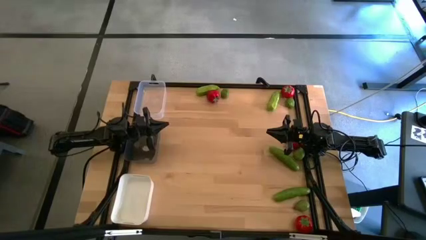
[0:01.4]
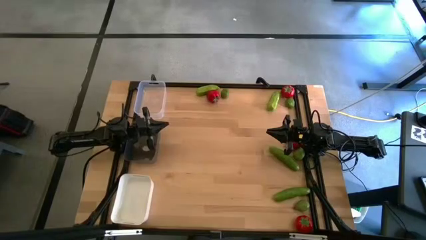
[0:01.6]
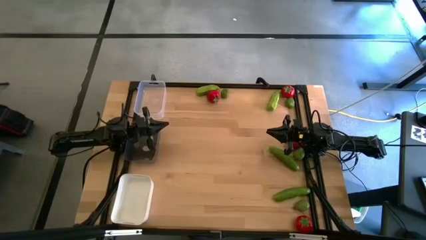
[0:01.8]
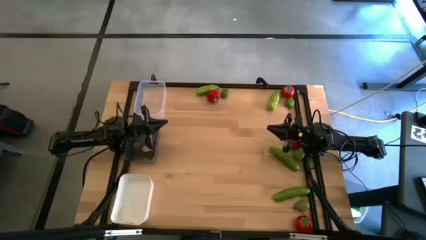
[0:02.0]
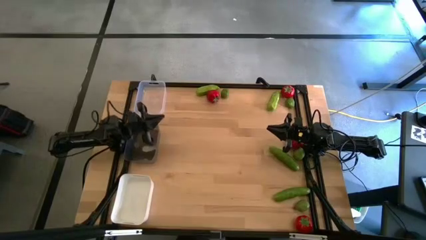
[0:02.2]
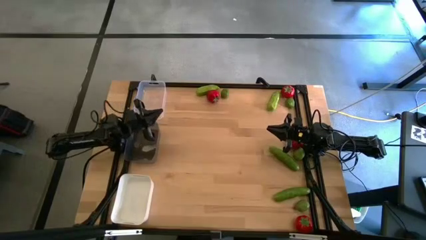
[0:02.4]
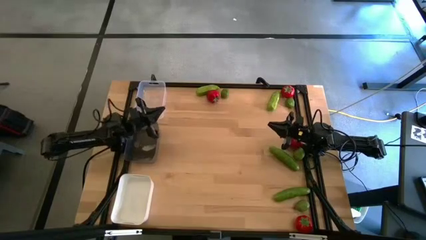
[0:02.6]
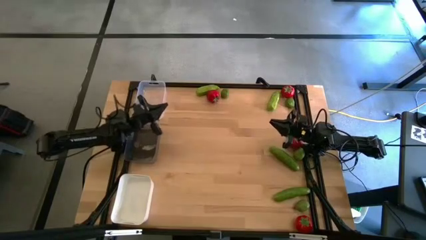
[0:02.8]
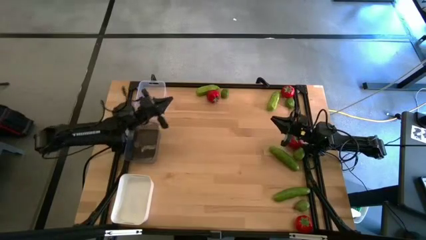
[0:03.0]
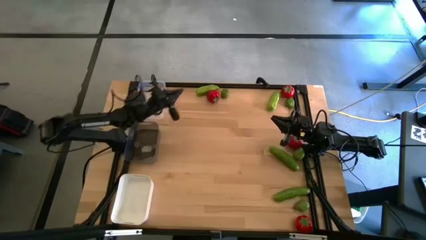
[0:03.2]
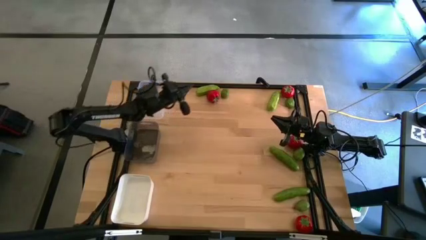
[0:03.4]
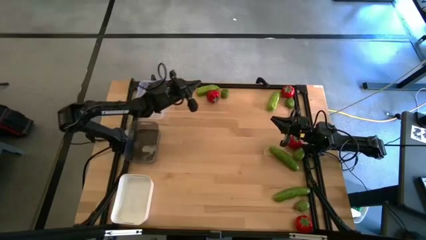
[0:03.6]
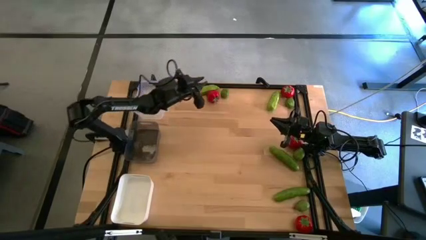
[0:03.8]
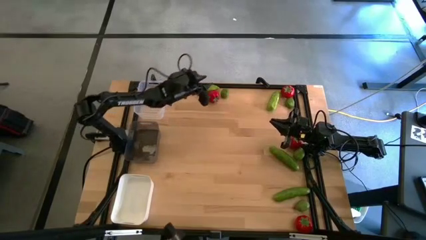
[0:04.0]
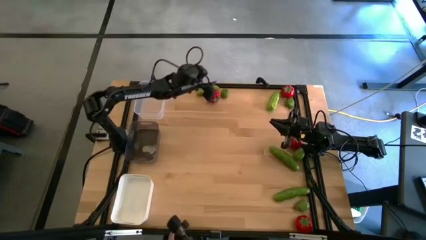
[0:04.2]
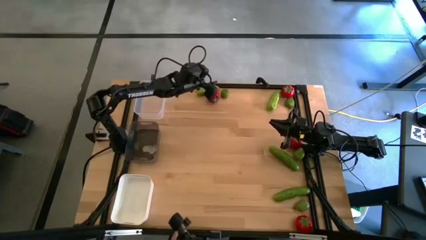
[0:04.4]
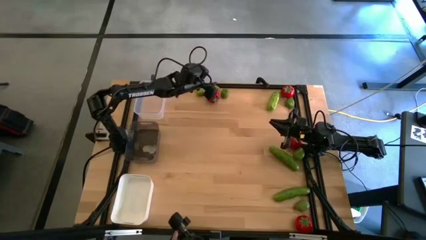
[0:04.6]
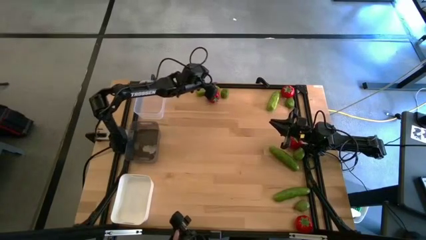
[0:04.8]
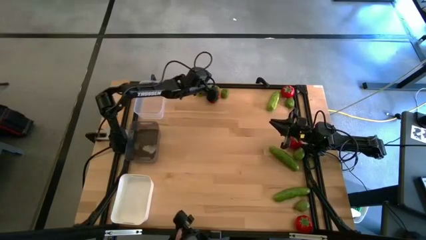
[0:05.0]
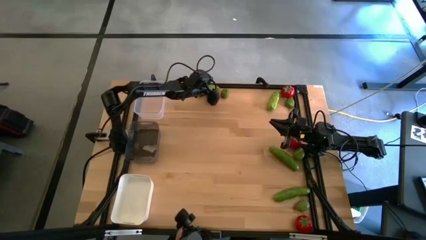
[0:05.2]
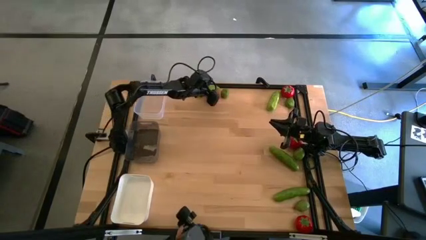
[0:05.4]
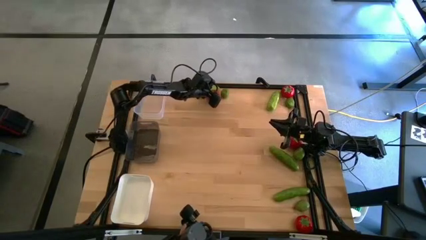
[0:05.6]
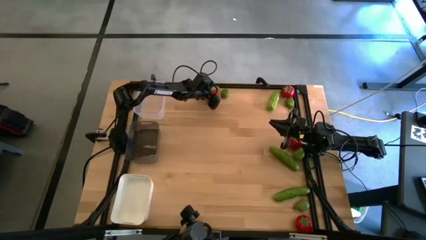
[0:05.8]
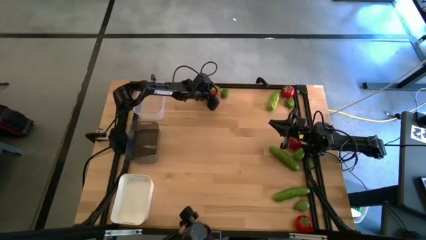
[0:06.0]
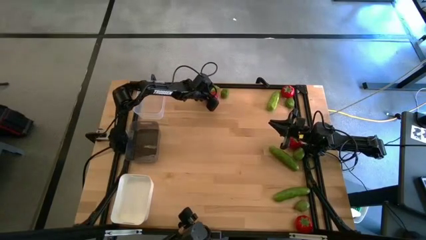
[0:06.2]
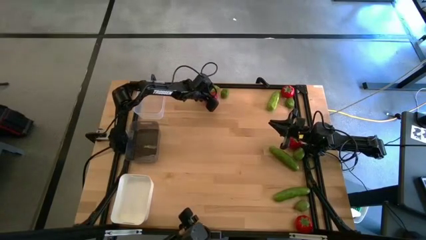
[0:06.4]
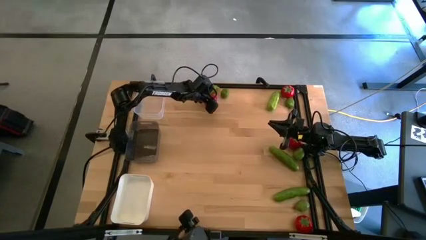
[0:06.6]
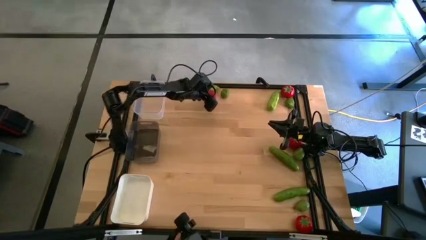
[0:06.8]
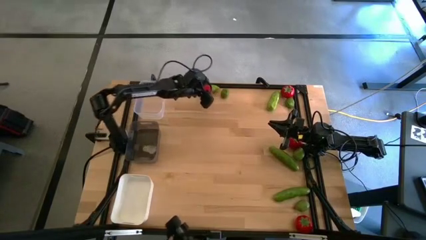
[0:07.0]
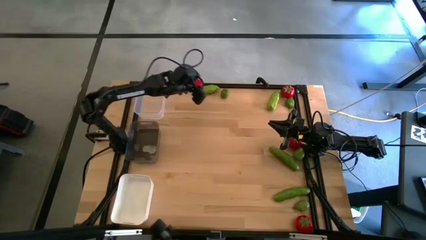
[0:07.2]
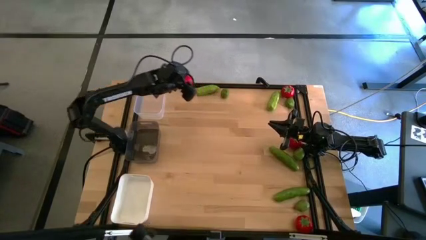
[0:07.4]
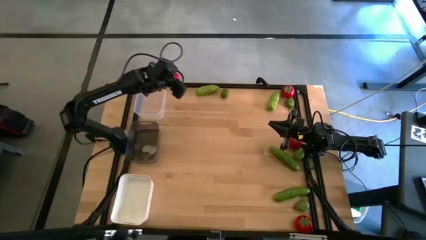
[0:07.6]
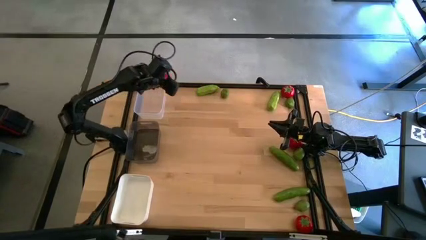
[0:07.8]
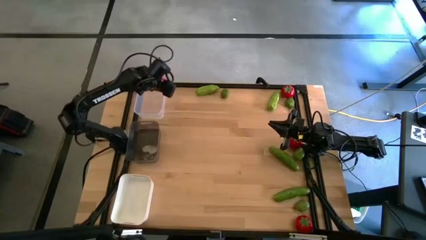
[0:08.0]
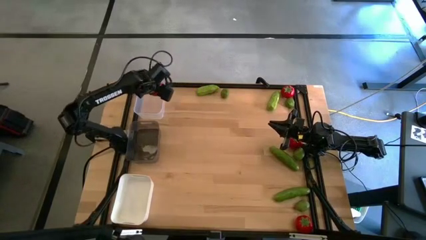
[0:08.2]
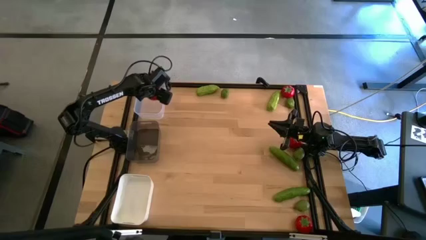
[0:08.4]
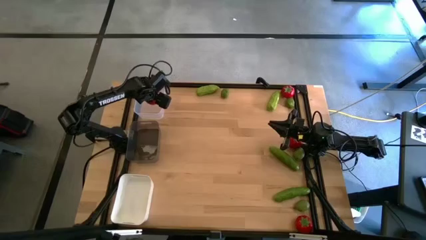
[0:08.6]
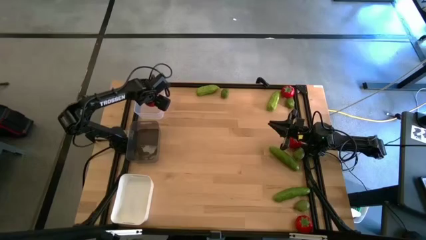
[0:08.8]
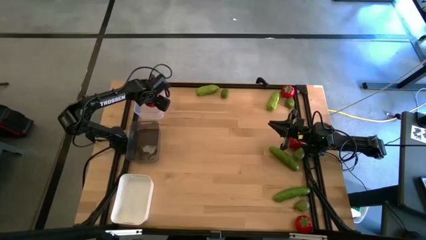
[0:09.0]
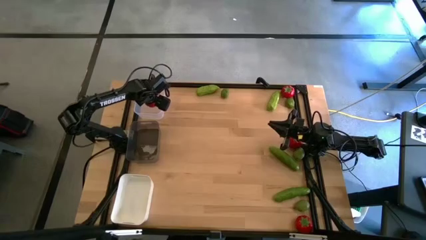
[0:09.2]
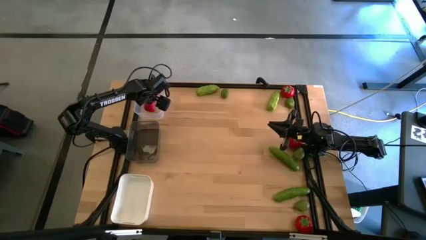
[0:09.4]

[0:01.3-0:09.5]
Task: Sort produce into baskets
Put the top left tomato into the transparent bin

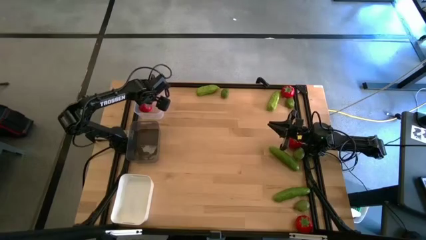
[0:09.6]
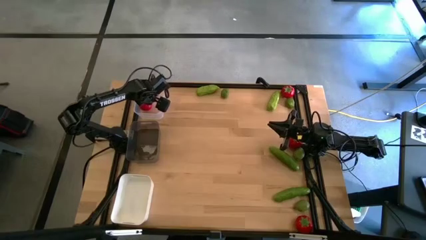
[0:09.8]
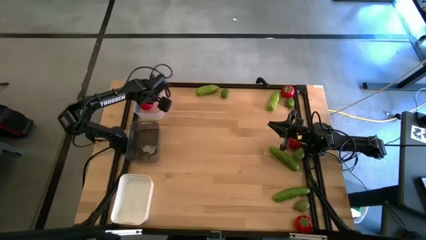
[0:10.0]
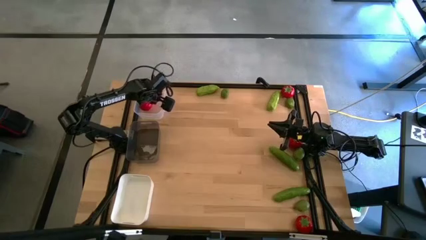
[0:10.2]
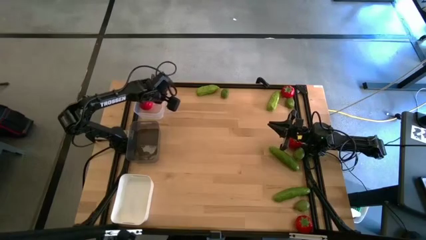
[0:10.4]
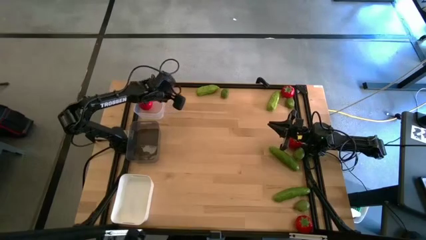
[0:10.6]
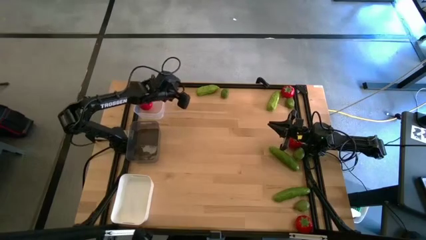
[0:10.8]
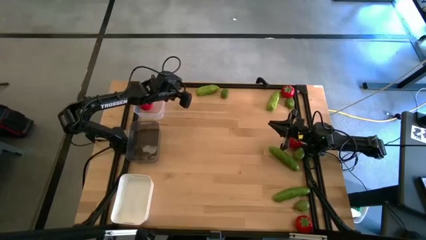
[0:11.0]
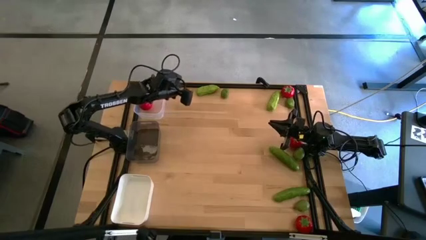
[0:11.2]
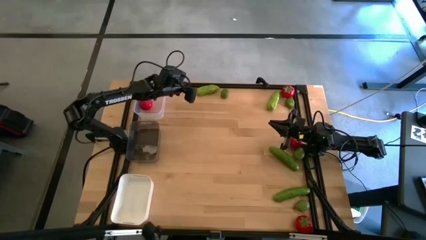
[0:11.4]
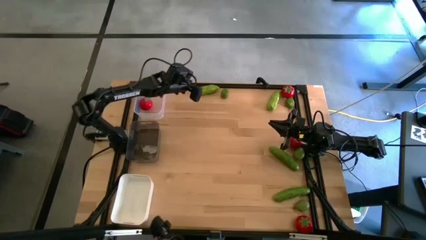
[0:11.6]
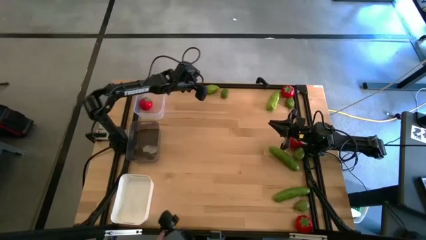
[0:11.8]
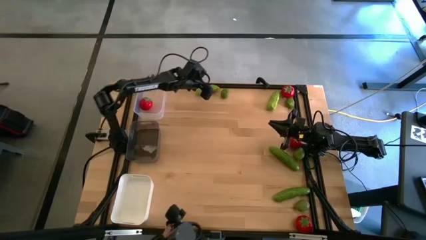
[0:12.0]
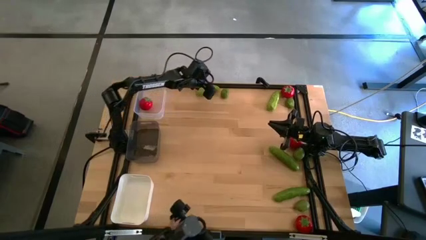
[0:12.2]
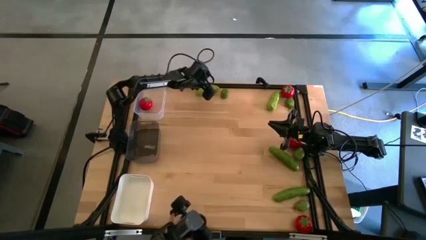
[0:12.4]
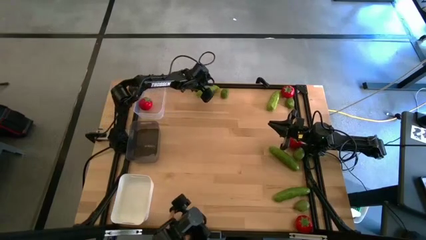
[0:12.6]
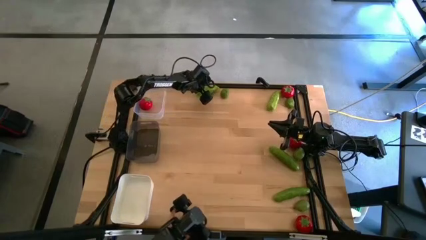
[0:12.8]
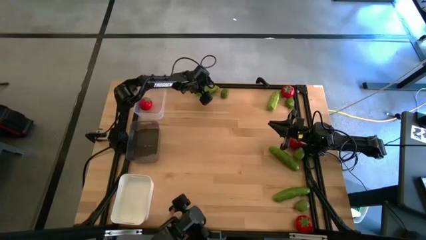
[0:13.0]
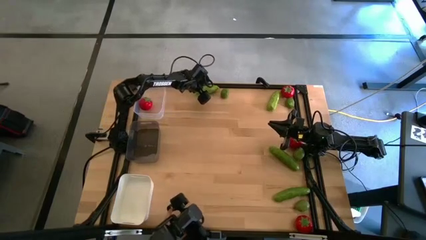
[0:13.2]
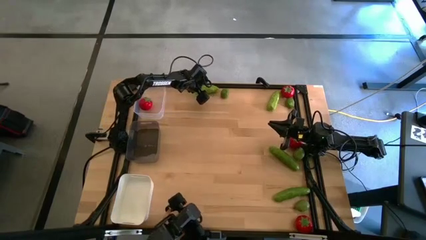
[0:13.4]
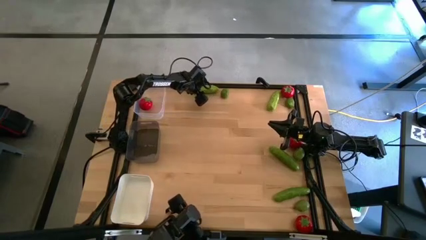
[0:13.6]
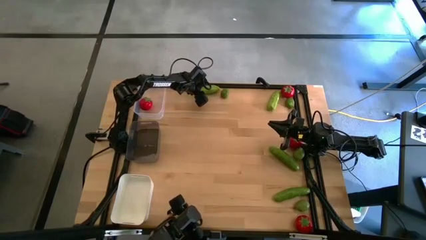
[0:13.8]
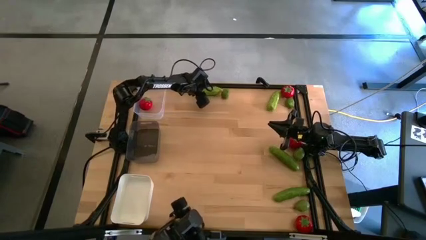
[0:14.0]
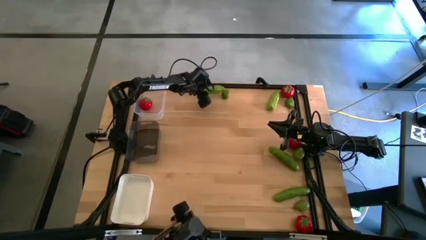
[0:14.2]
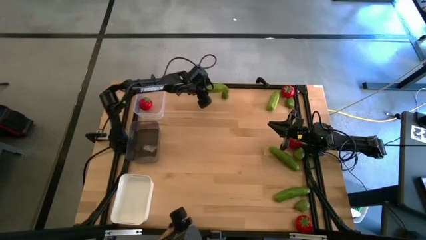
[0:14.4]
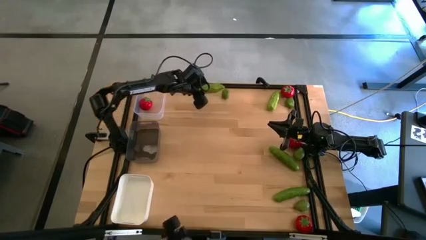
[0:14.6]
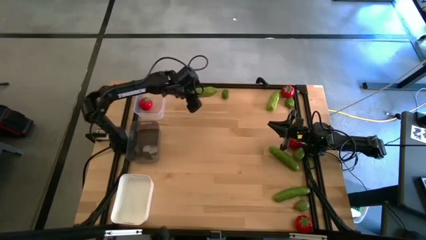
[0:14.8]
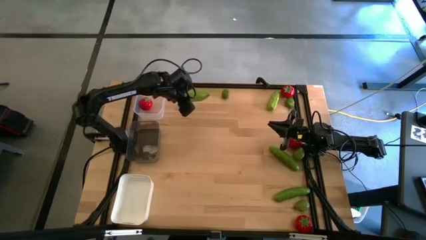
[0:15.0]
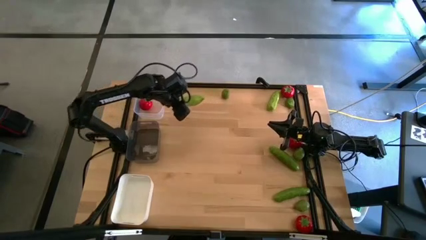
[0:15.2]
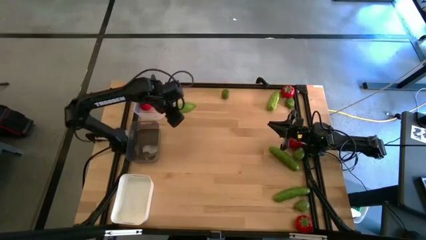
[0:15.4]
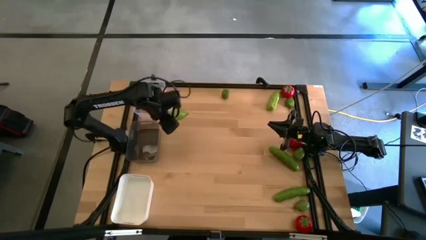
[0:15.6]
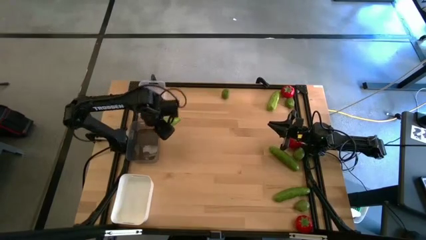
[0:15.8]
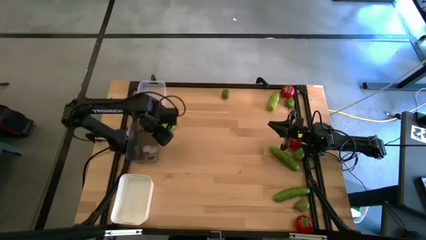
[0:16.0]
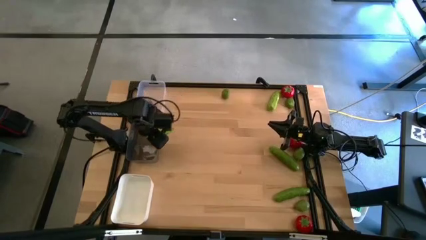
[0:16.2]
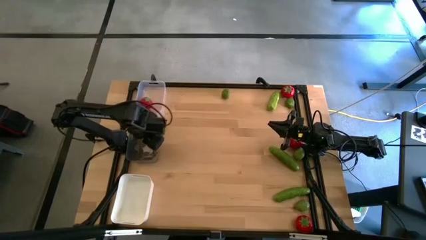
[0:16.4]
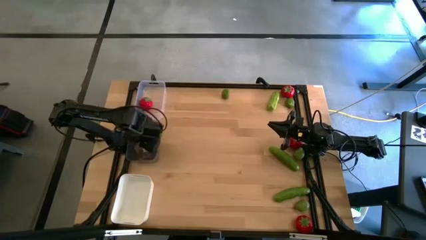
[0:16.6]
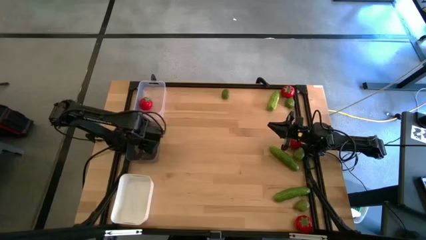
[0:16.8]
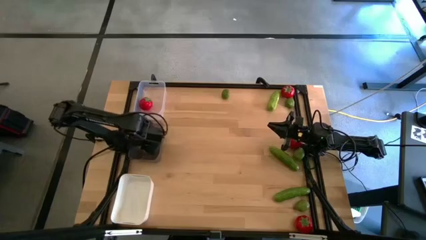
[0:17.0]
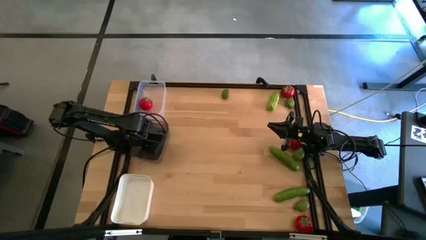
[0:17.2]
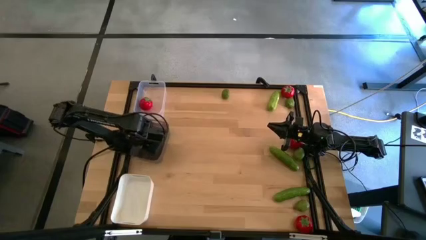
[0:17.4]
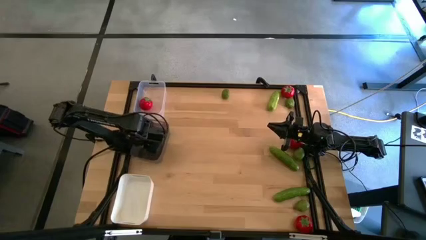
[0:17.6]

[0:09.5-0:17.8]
Put the top left bitter melon into the black bin
